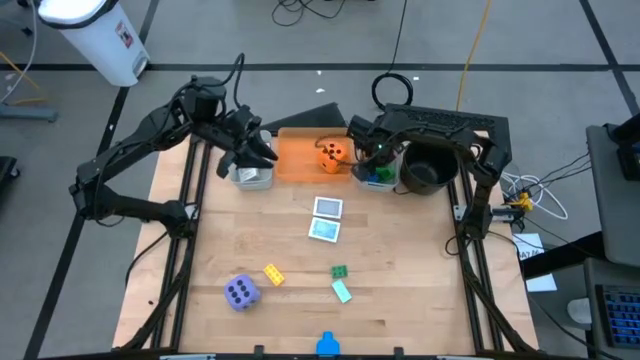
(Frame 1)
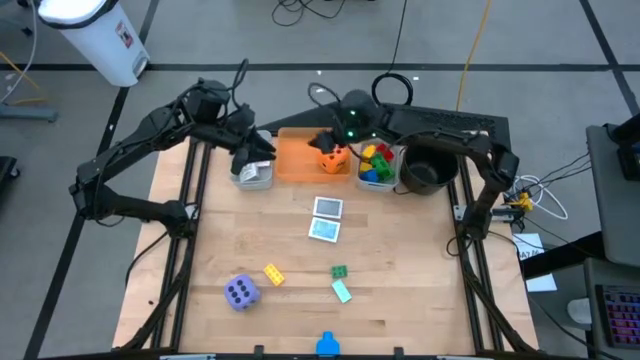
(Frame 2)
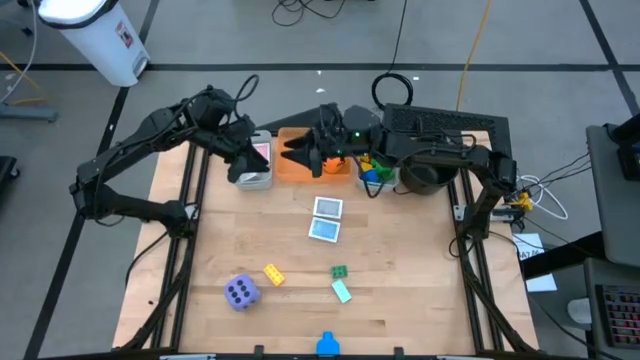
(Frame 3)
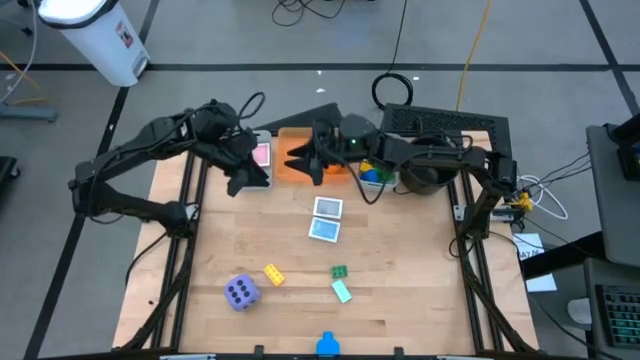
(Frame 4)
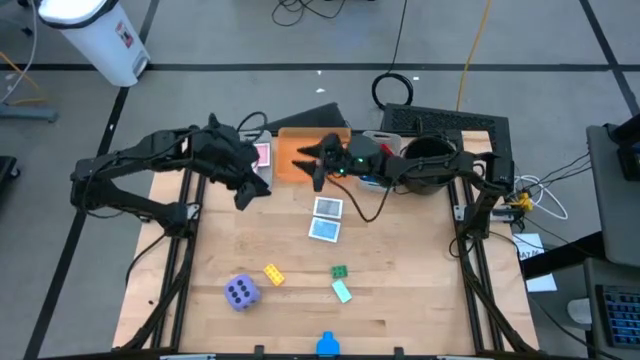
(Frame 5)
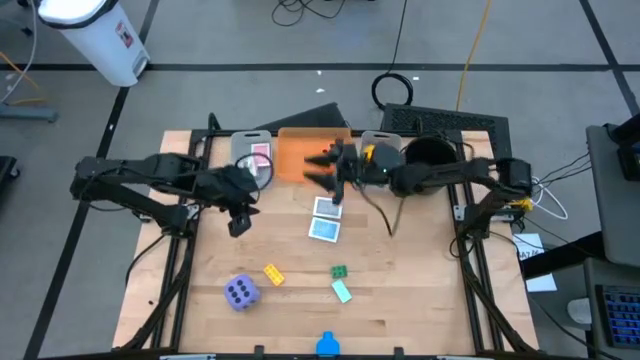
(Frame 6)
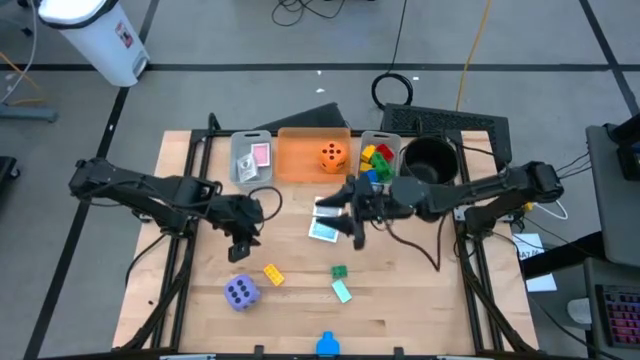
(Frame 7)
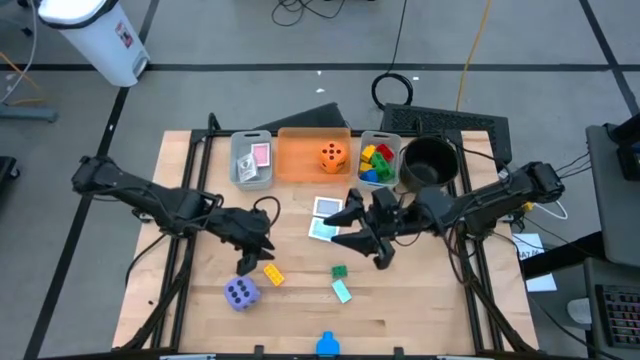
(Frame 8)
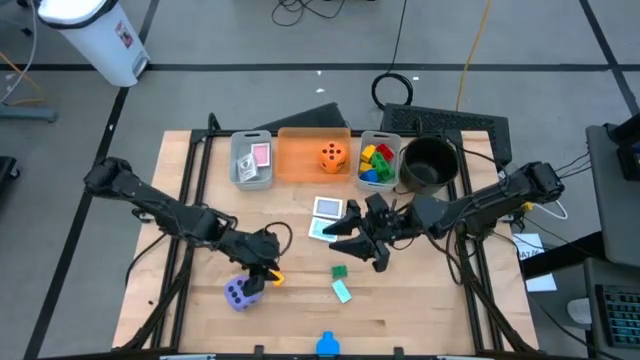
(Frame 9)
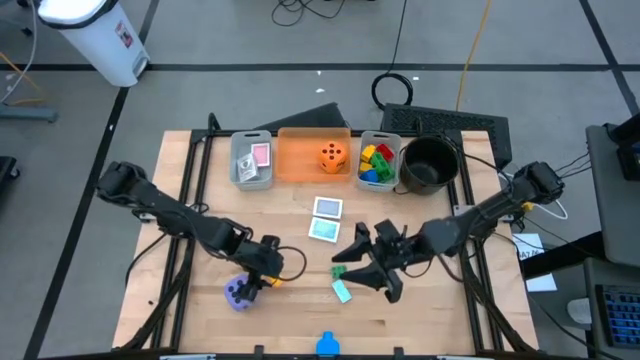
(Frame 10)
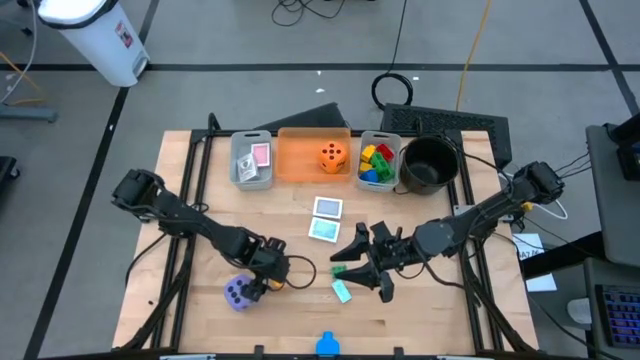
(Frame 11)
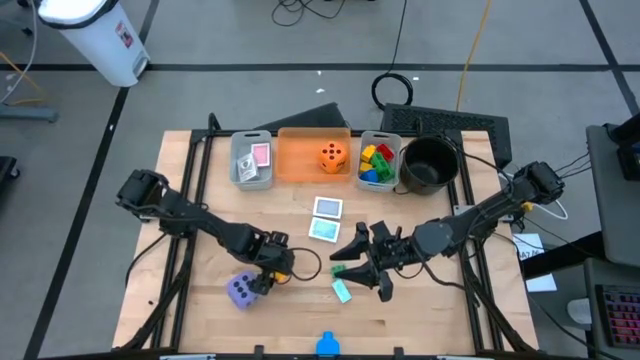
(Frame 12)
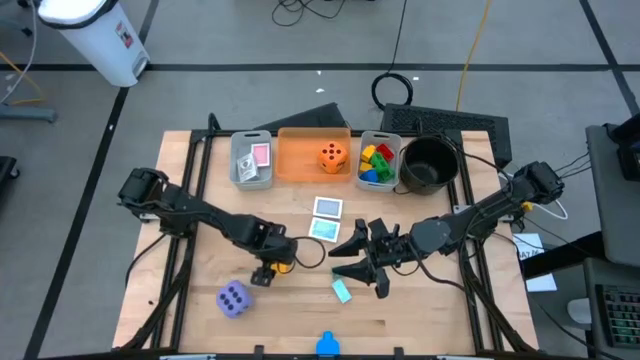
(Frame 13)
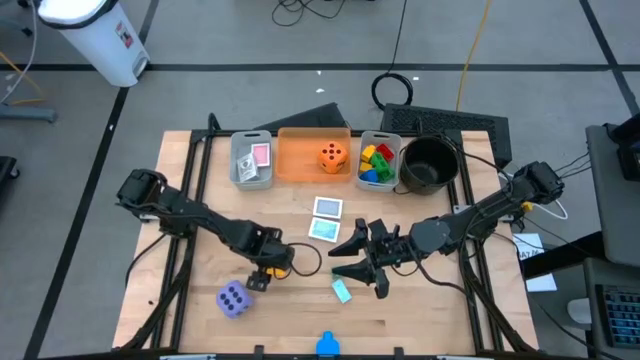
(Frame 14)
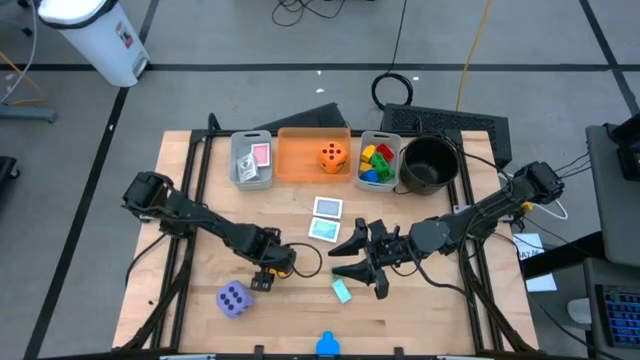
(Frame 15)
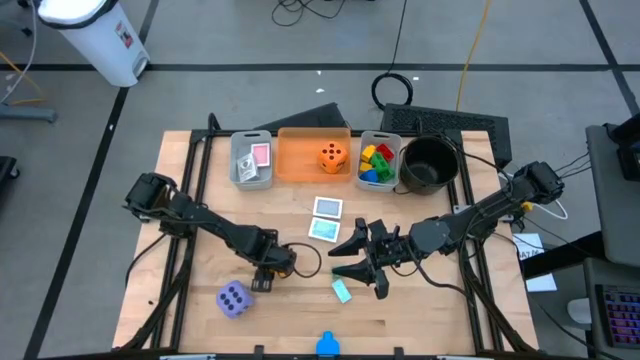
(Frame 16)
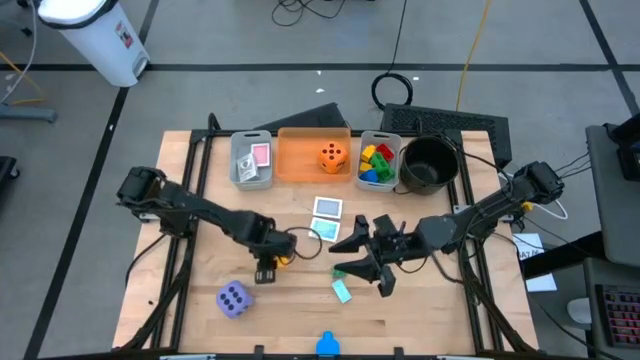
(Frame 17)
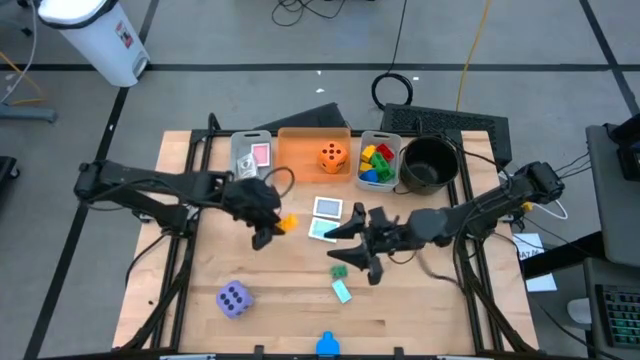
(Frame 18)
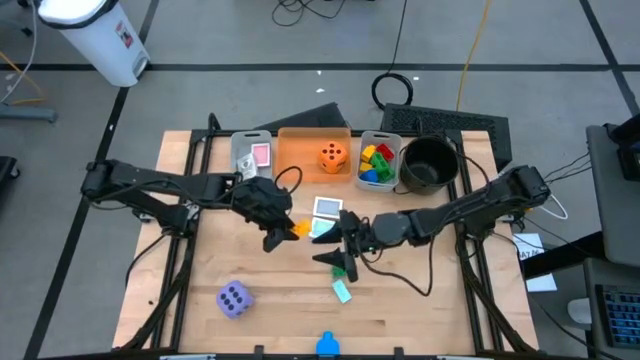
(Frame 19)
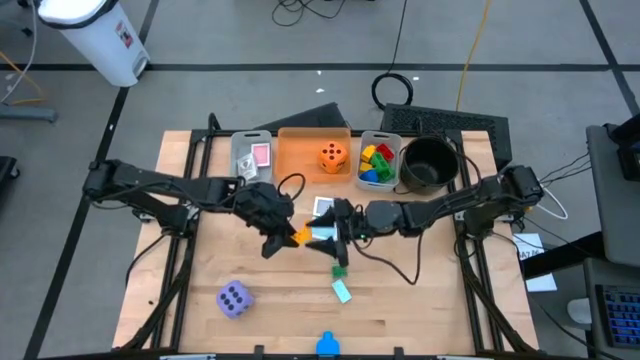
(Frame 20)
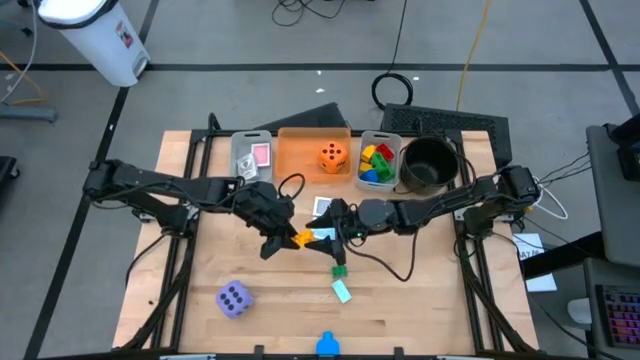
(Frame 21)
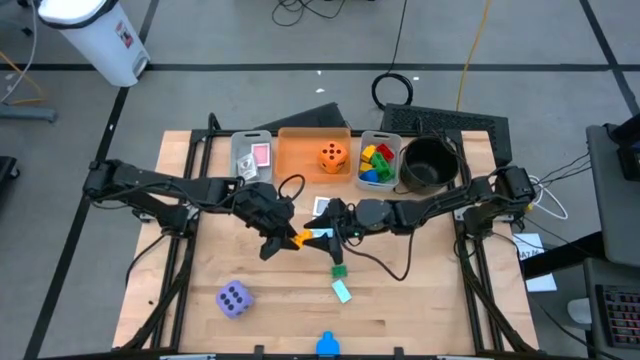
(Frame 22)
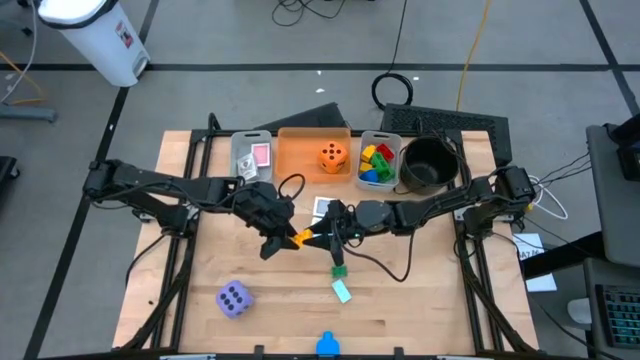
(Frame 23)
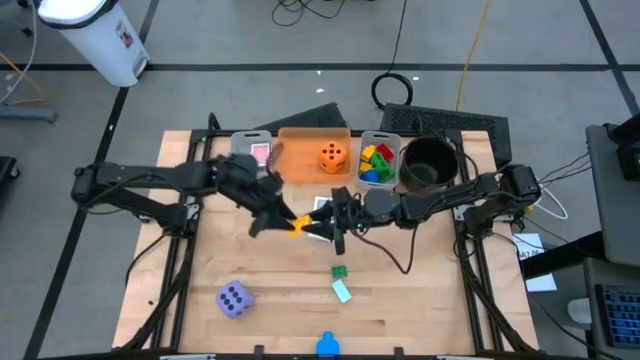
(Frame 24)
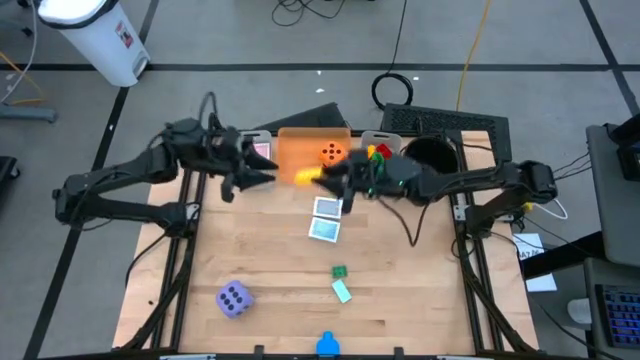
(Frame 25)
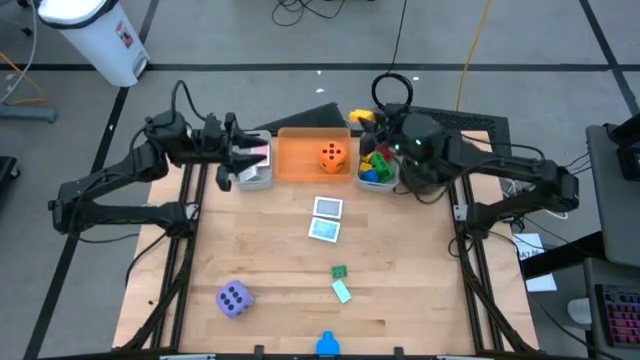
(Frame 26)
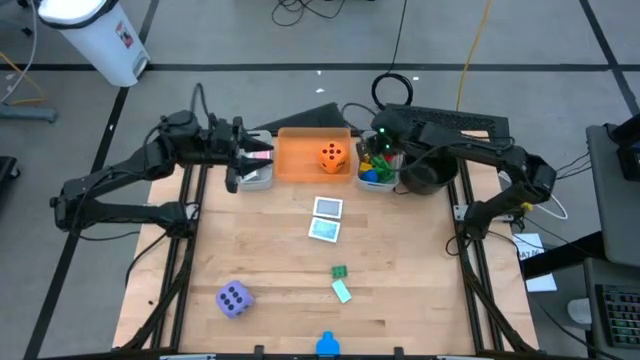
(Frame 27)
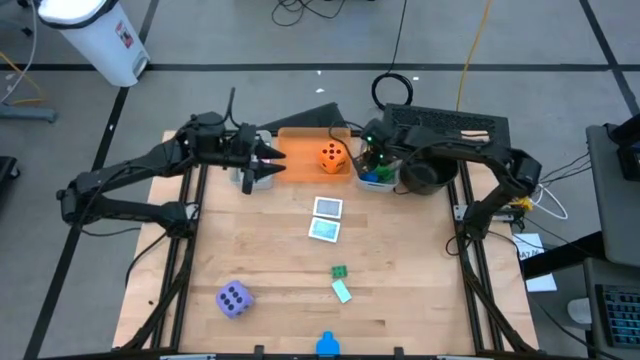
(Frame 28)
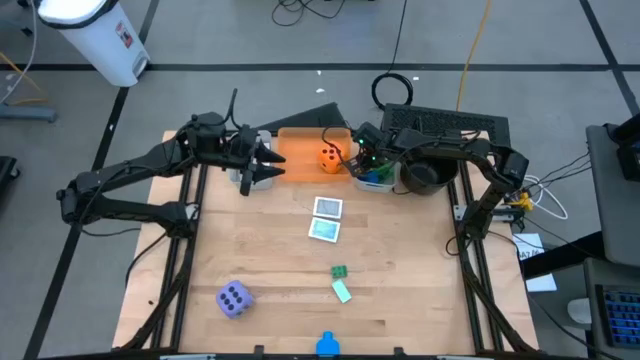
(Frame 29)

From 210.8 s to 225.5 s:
Task: Pick & Place Toys
Put the yellow game piece into the right gray bin

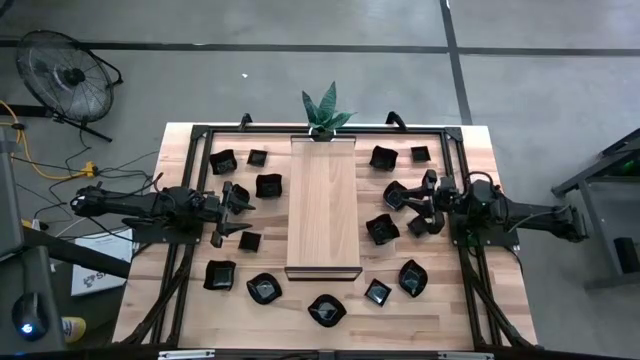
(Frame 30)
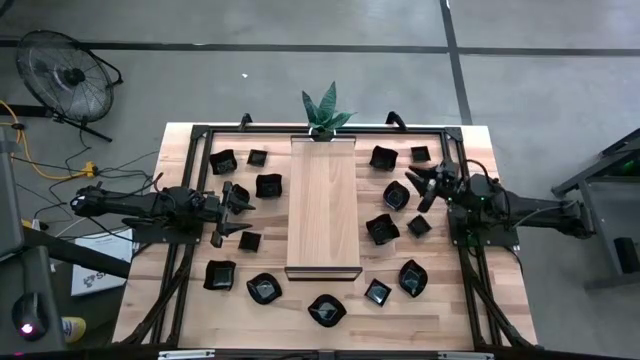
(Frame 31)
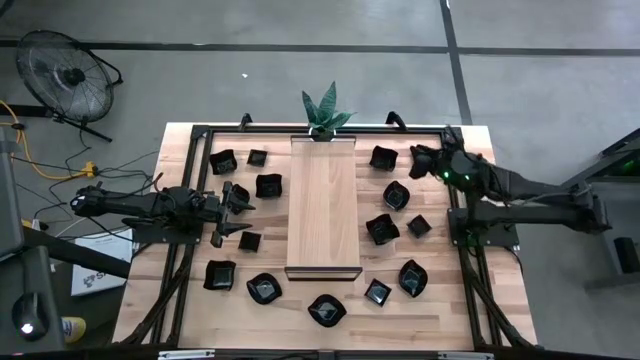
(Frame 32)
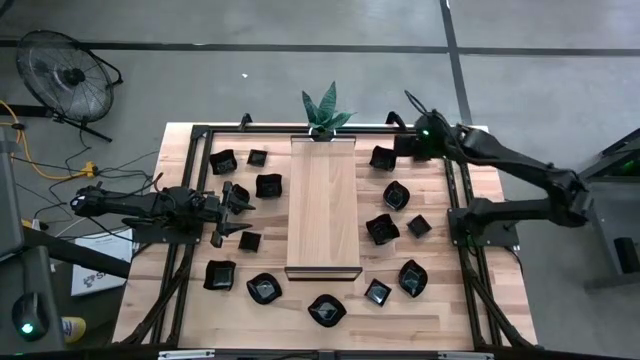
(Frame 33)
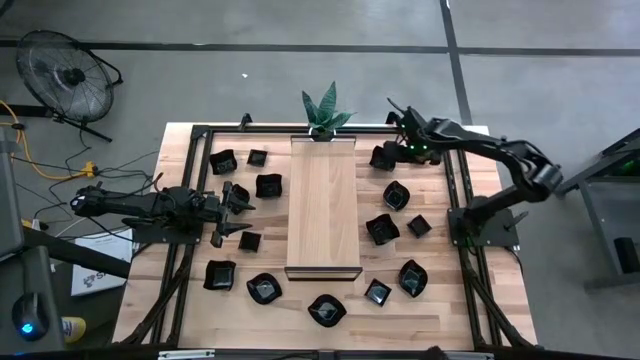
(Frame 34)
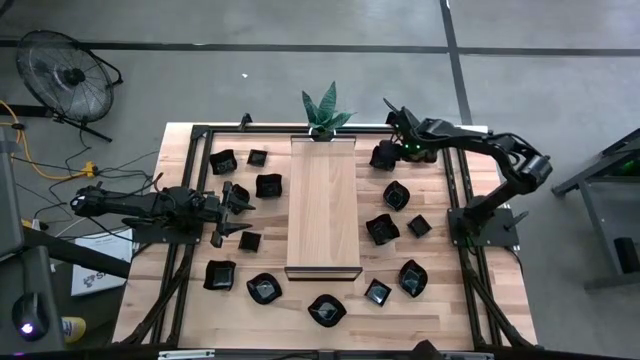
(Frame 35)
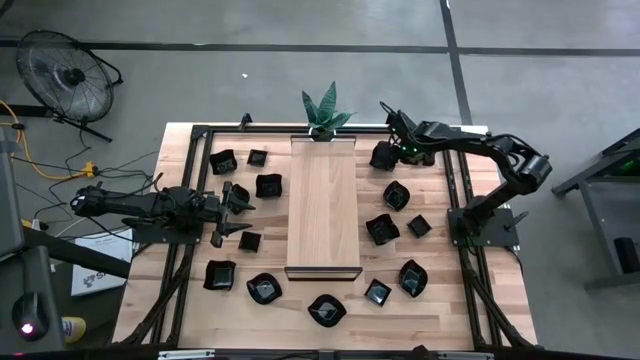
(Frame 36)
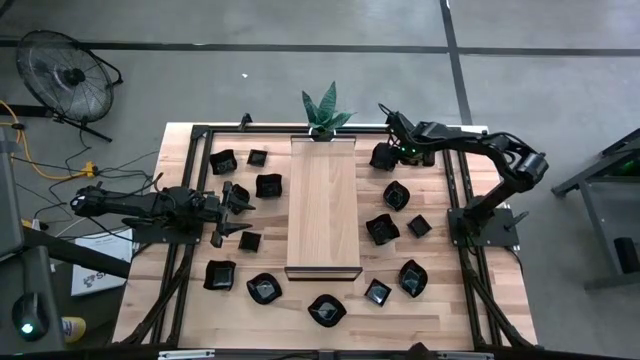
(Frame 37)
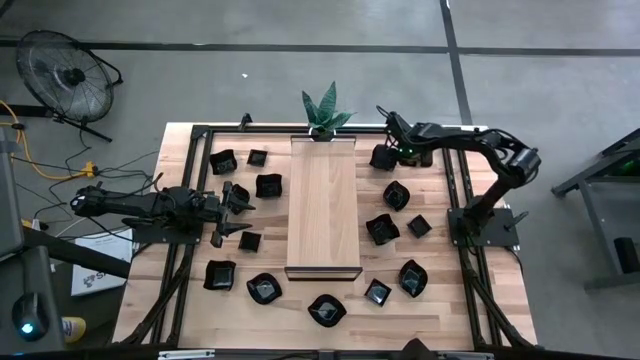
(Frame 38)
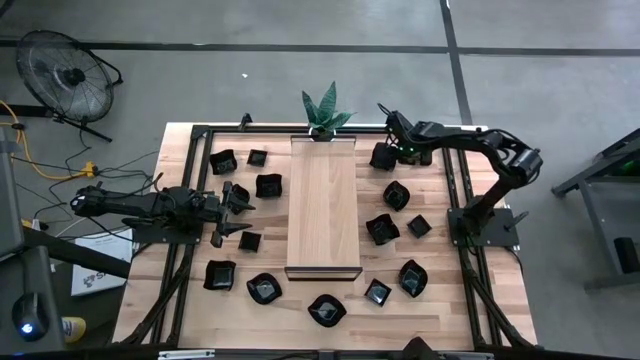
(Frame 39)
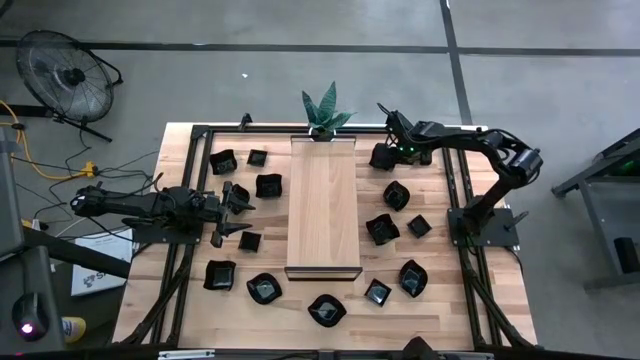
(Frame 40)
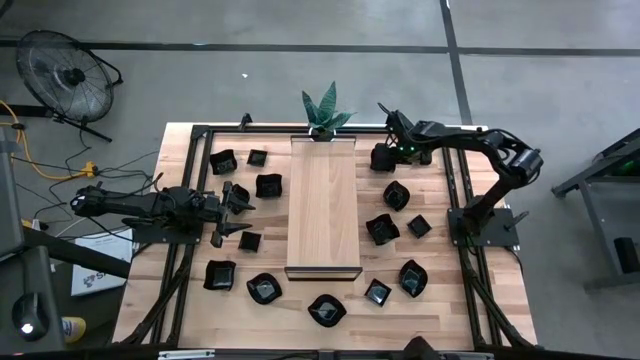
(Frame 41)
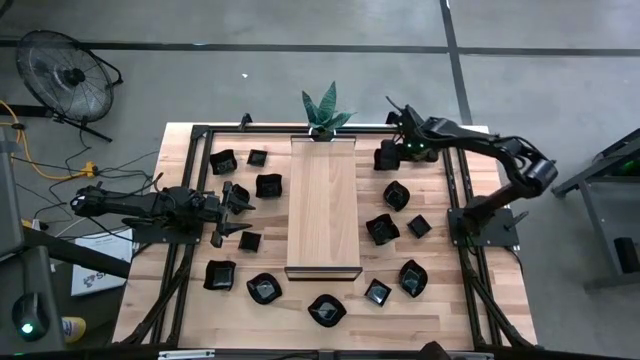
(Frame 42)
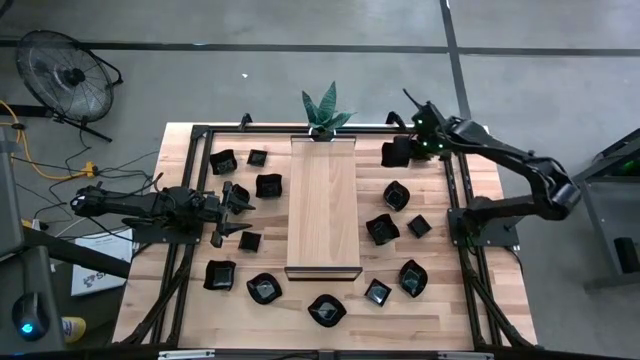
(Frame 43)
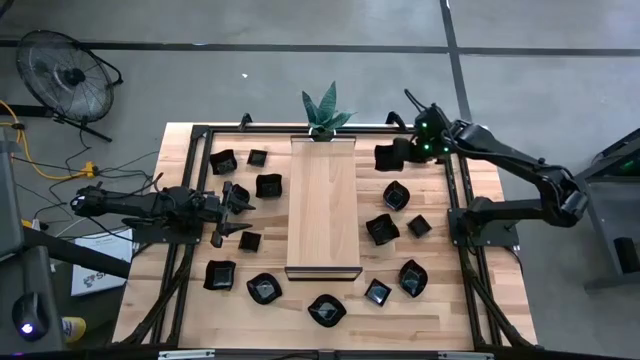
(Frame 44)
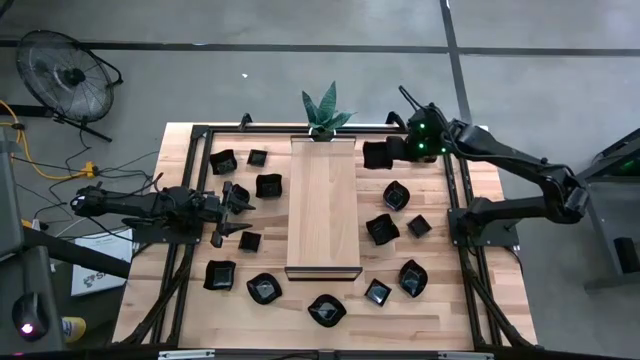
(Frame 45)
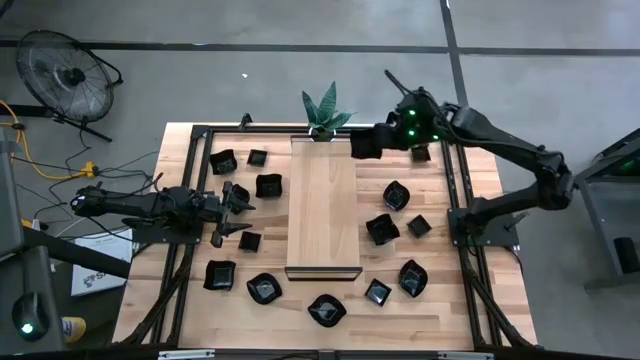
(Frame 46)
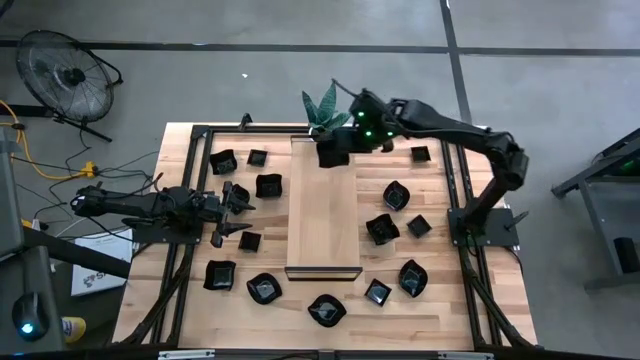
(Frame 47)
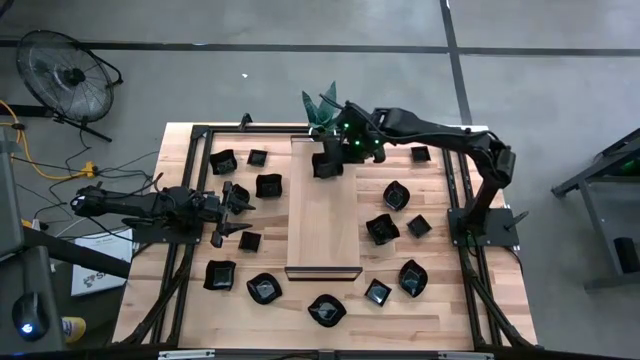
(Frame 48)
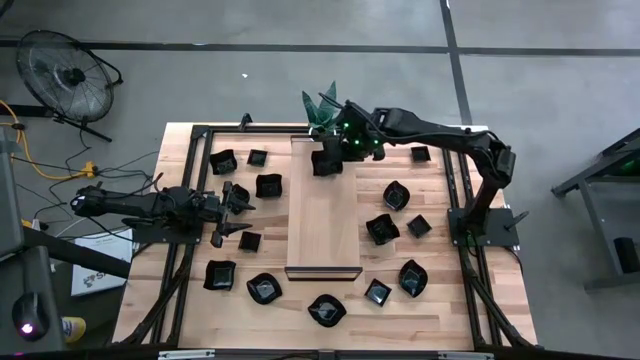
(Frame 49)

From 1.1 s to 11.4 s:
Task: Pick & Place Mini shaped plates
Put the black distorted square plate on the shelf
